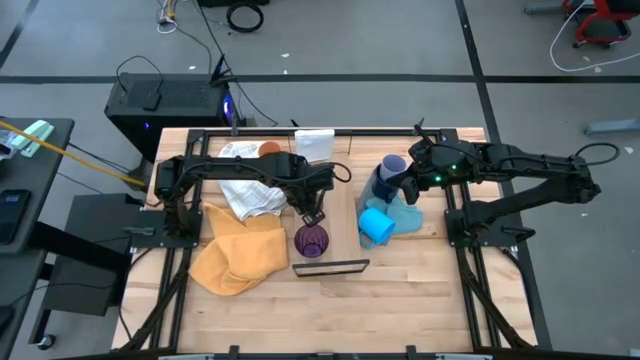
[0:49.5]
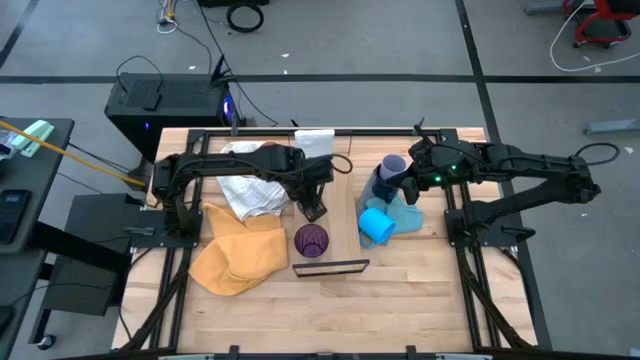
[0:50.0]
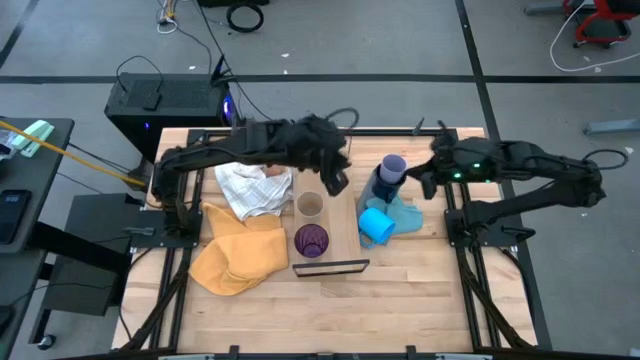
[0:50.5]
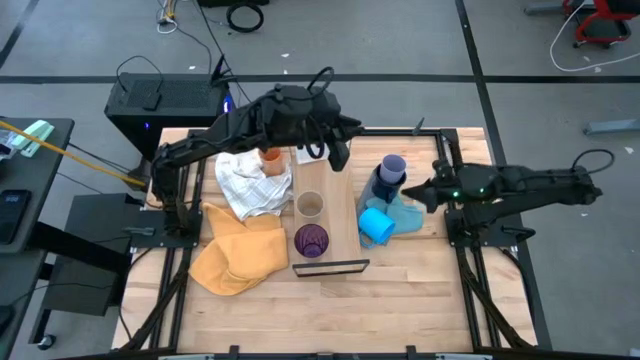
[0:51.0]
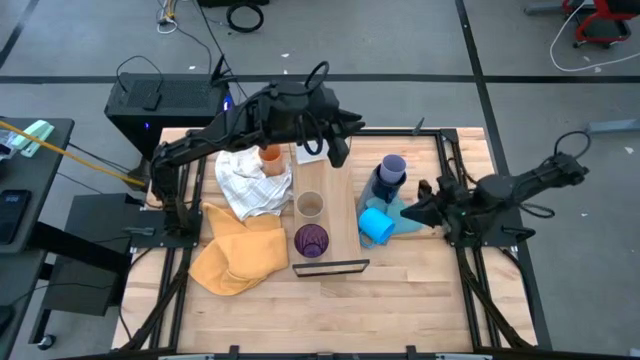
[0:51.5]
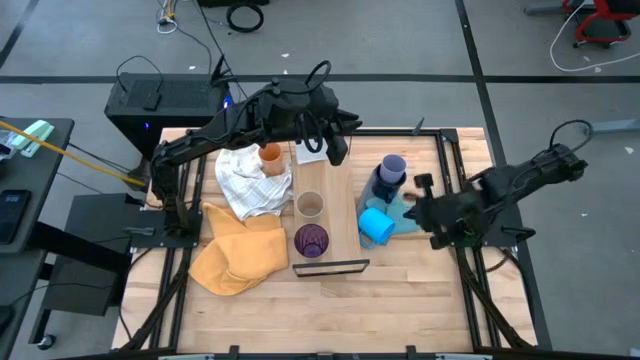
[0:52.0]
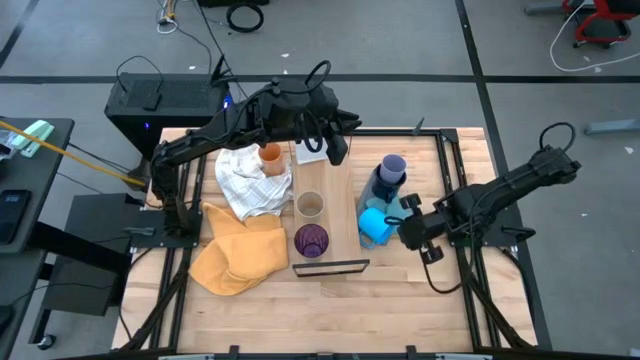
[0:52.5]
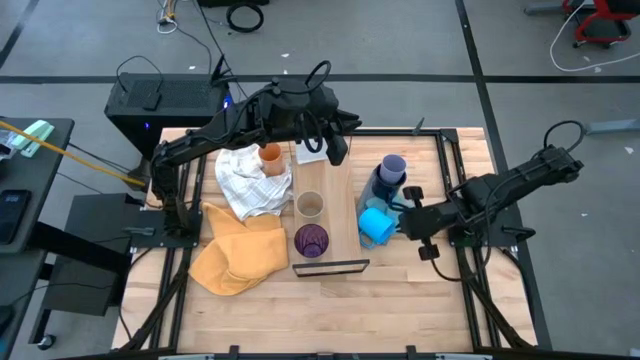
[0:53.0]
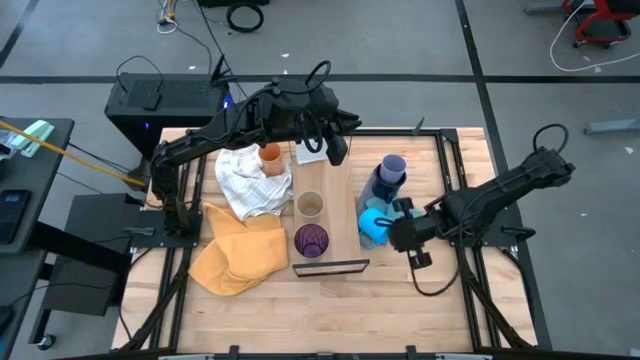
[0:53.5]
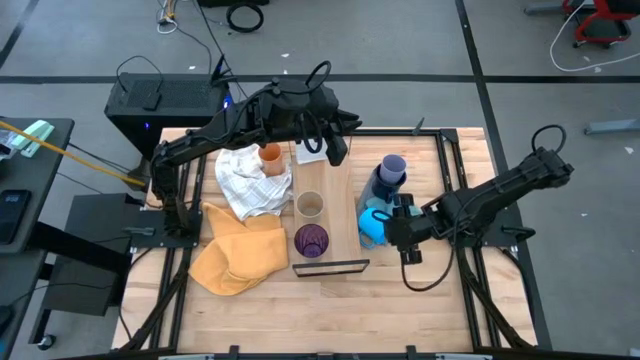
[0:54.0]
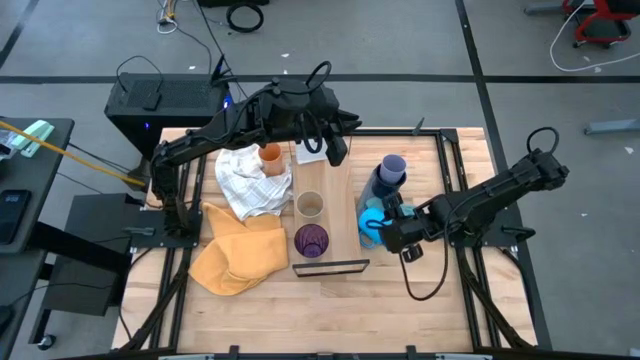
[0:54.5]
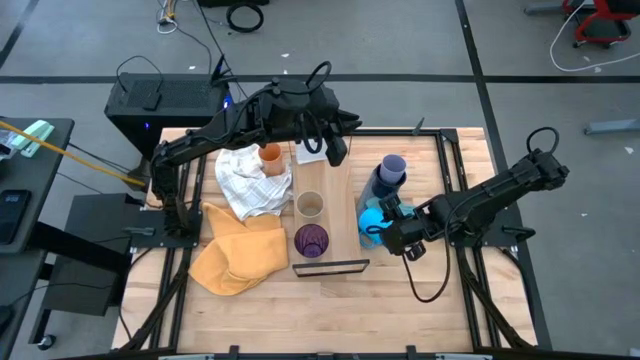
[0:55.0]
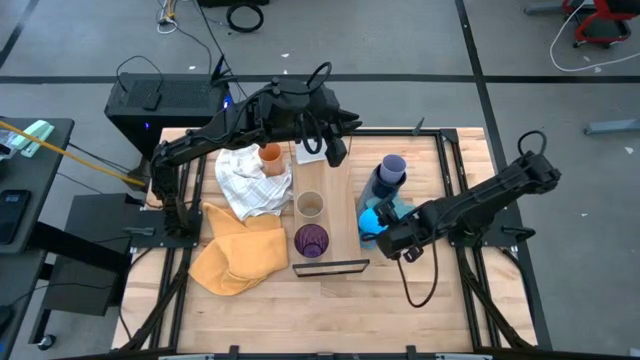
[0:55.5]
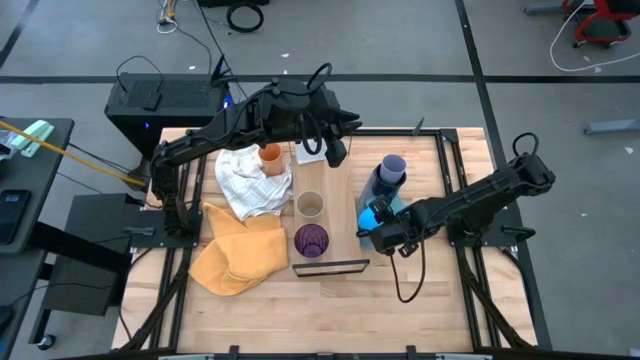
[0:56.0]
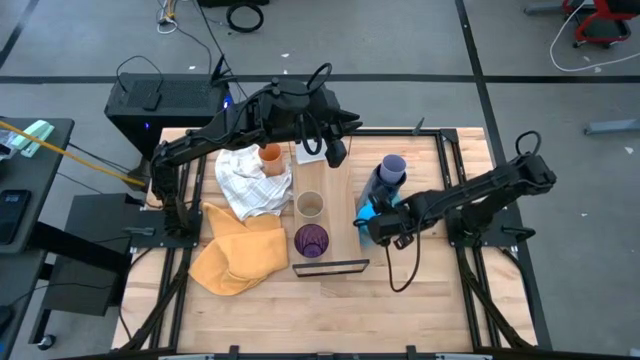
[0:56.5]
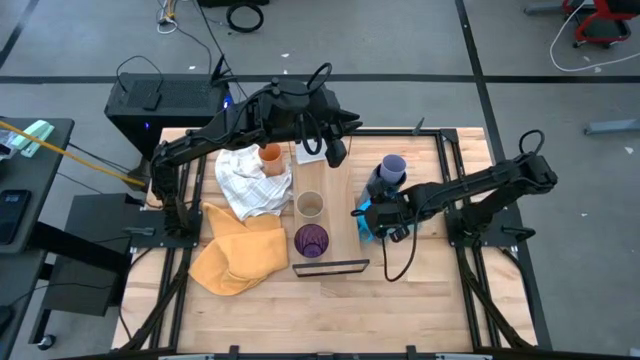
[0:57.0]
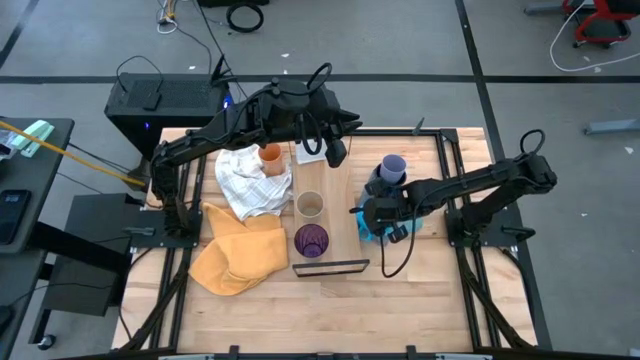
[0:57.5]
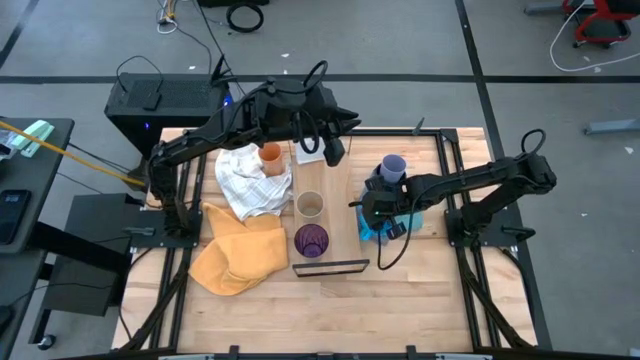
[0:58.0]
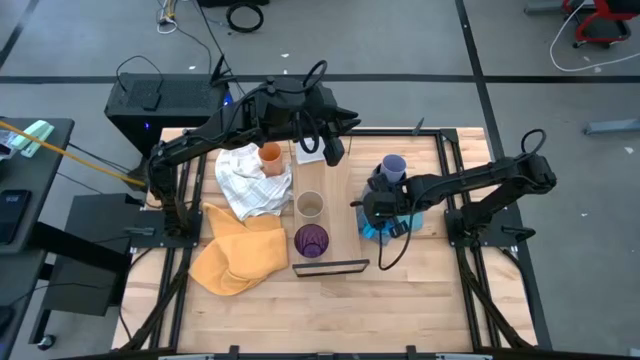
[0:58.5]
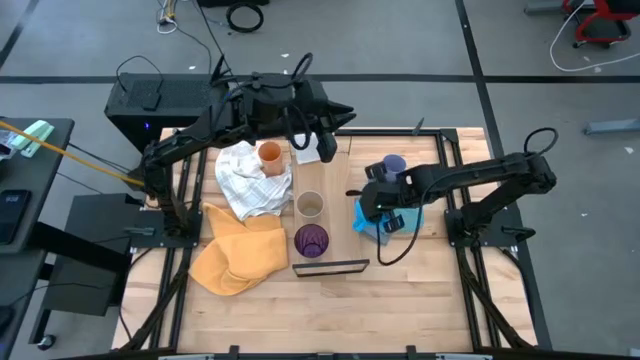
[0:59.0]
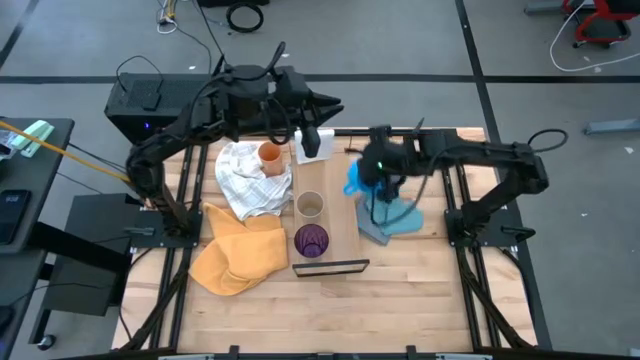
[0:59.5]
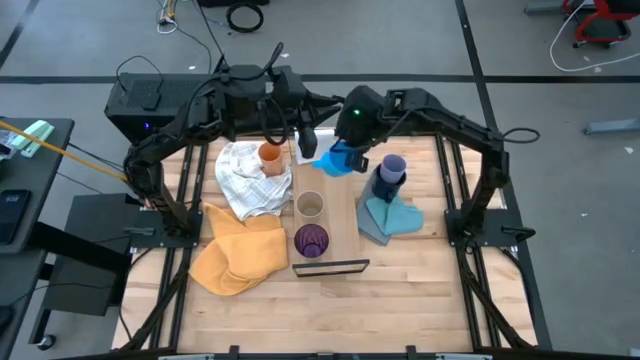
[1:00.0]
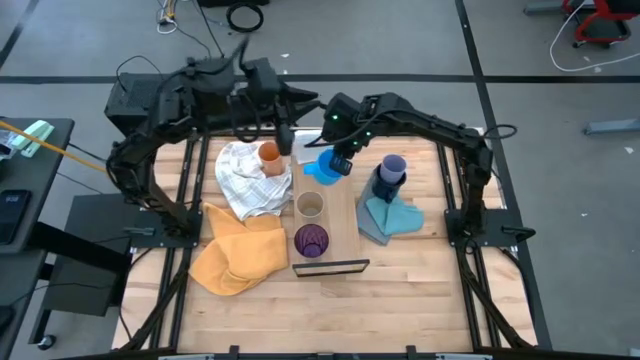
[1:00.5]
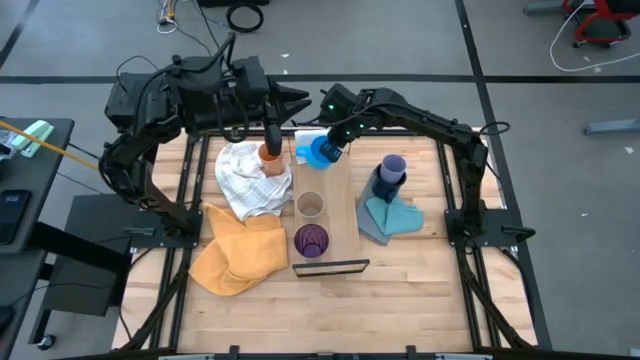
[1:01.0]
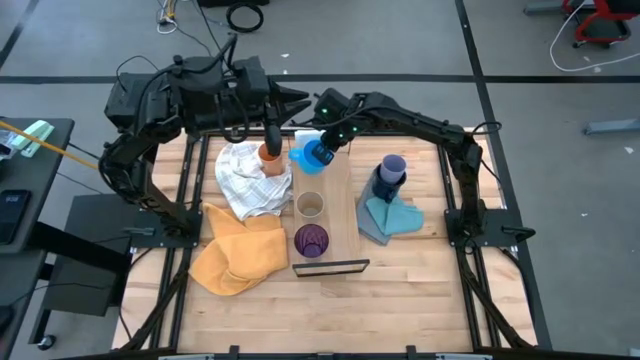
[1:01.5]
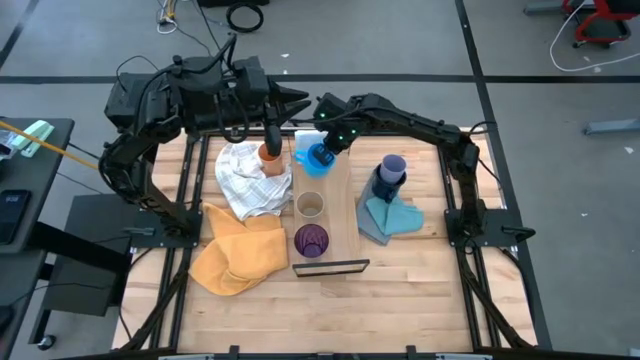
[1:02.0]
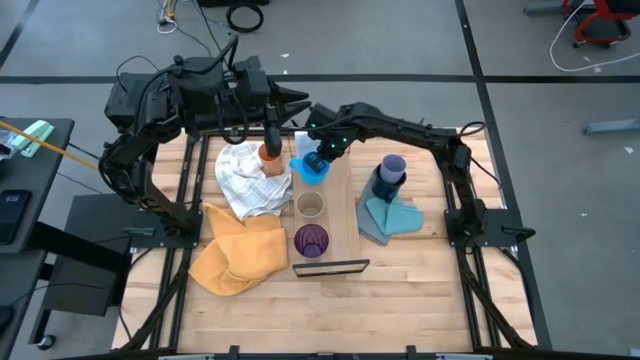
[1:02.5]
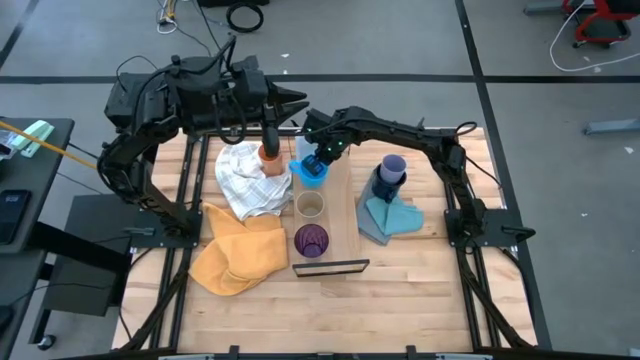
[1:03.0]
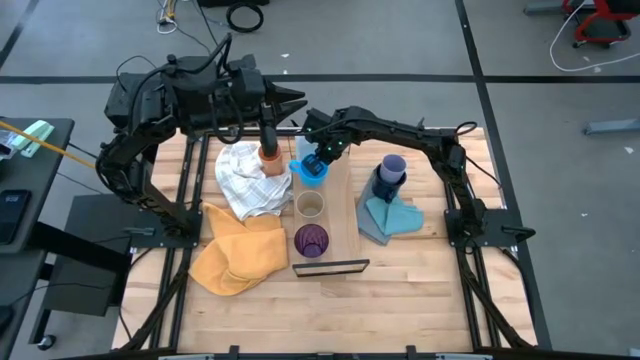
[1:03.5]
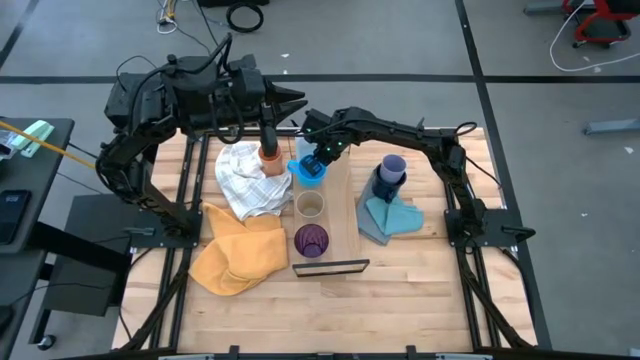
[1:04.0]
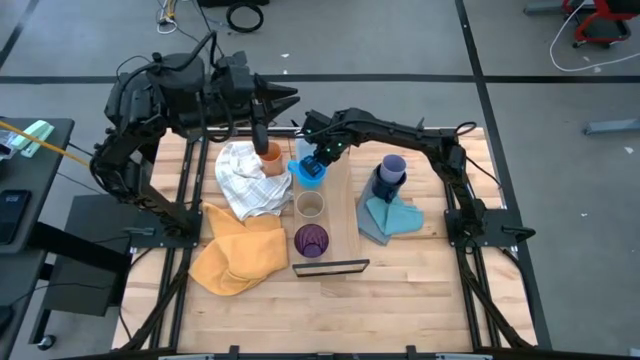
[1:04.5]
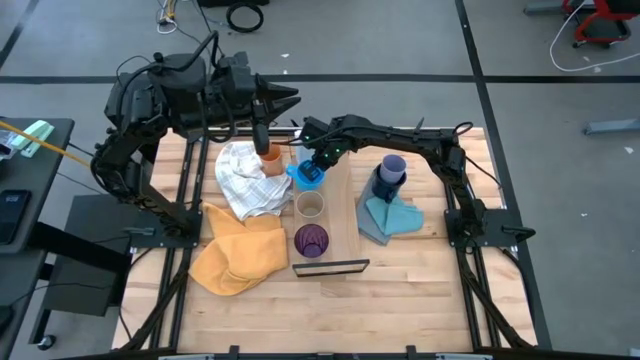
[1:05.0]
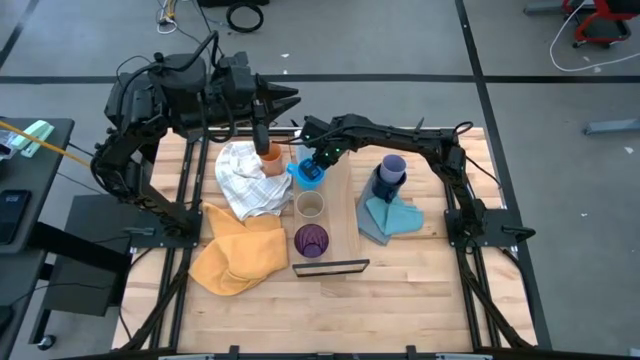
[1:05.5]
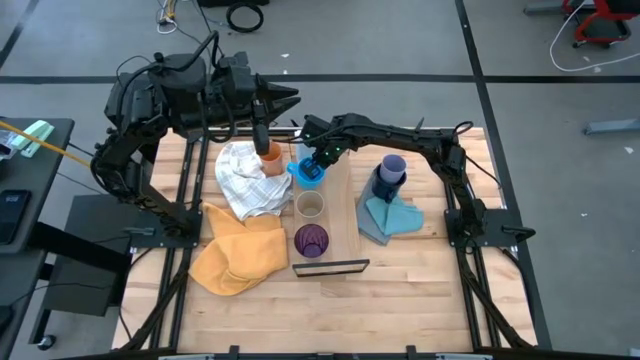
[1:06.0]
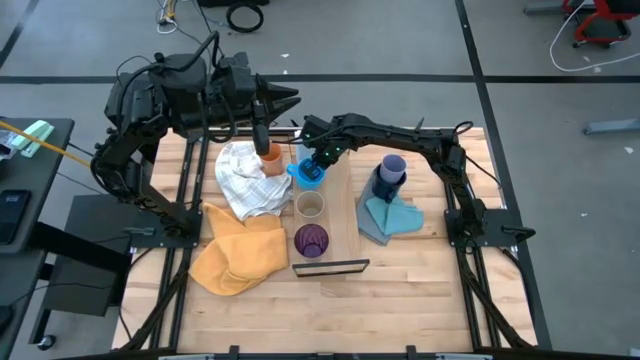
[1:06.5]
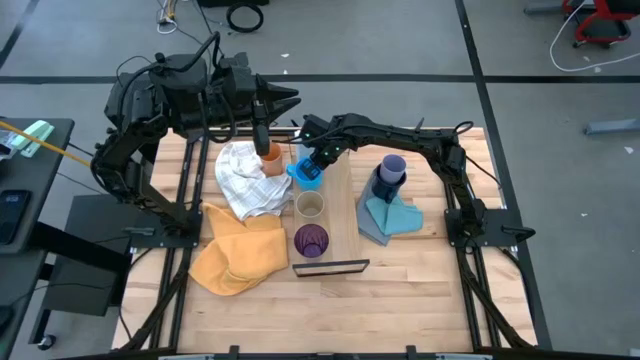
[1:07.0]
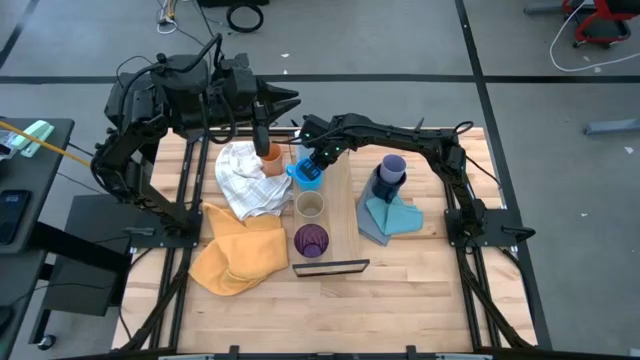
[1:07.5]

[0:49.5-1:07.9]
Task: Stack small to large cups/mugs on shelf
Put the blue mug on the shelf
